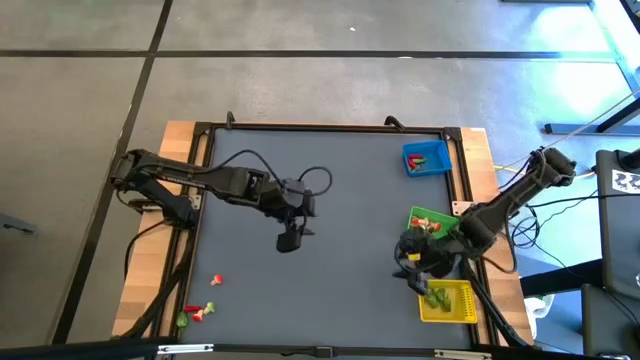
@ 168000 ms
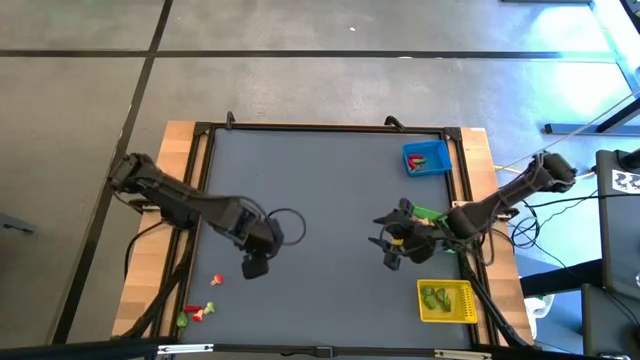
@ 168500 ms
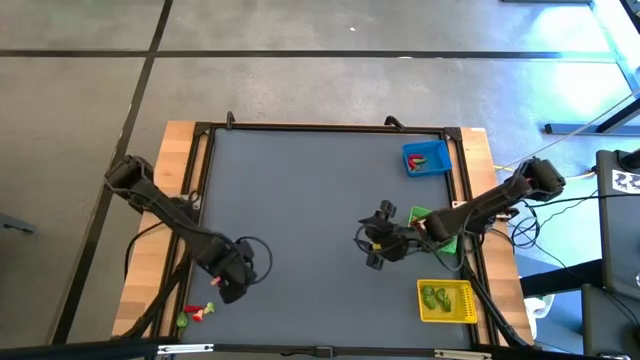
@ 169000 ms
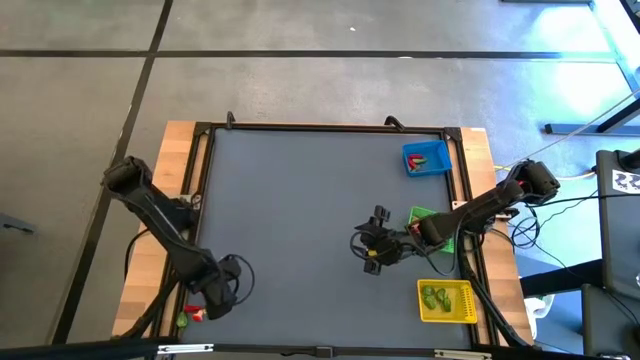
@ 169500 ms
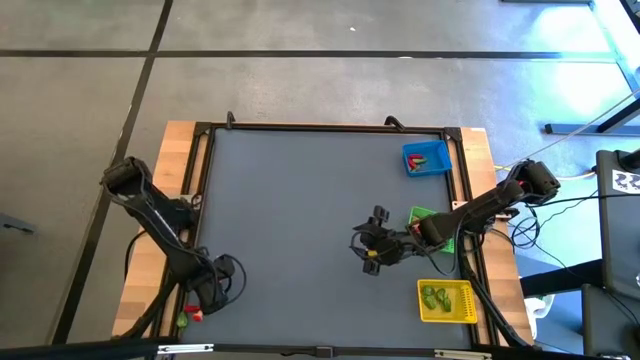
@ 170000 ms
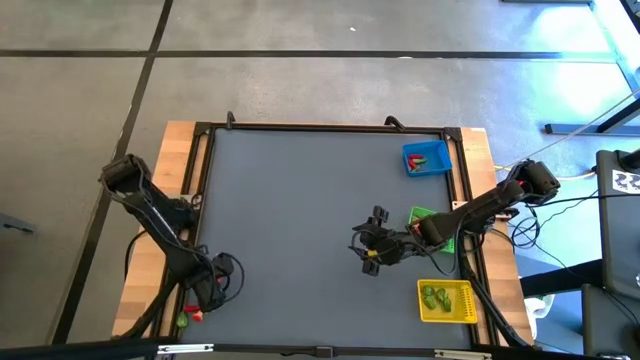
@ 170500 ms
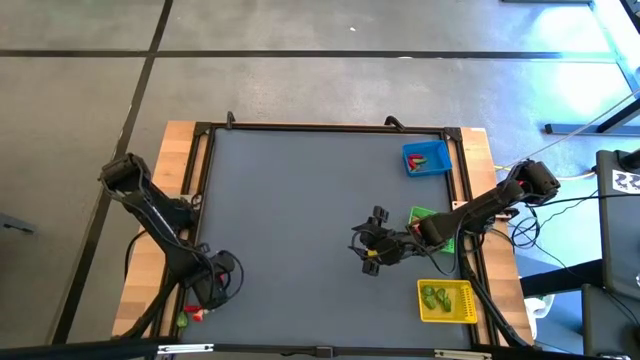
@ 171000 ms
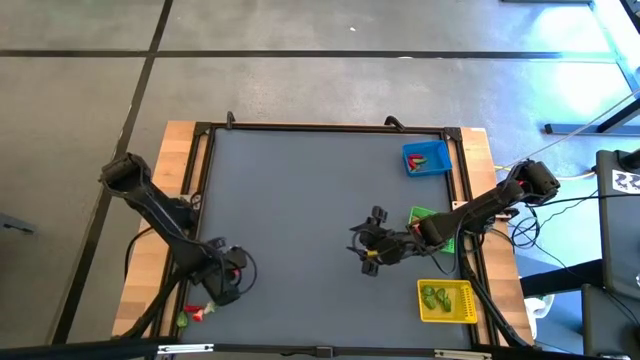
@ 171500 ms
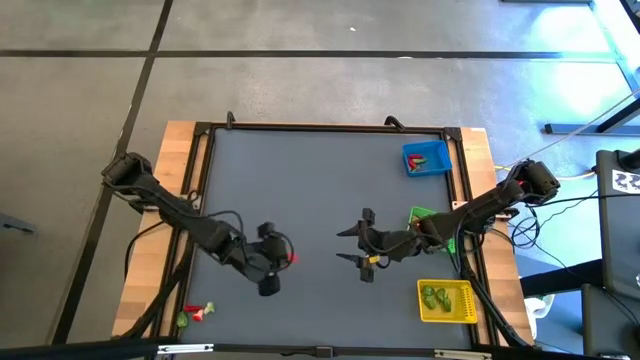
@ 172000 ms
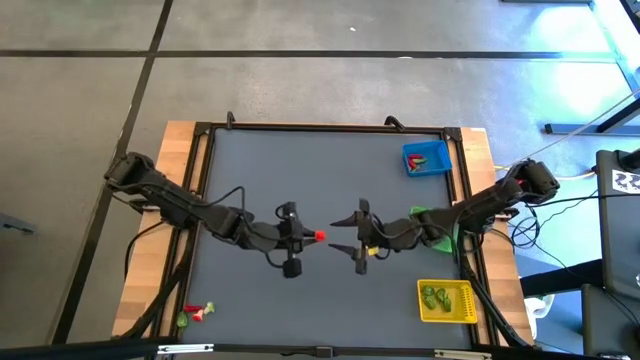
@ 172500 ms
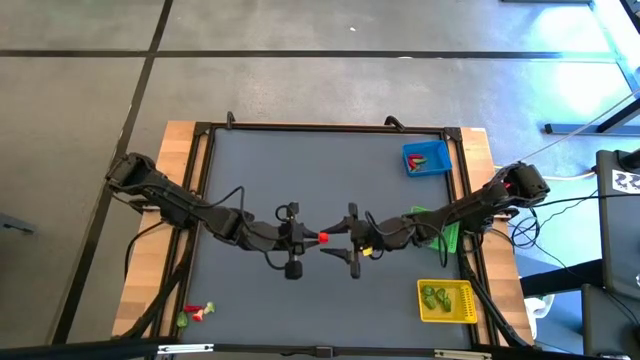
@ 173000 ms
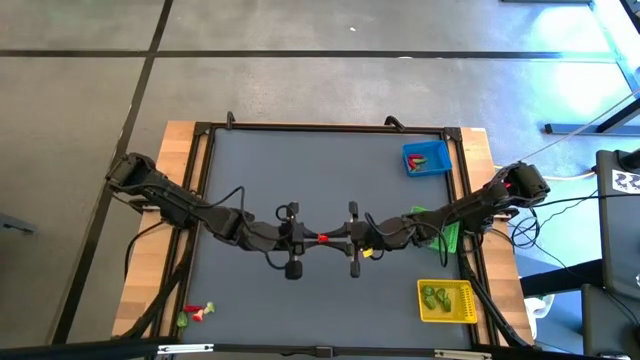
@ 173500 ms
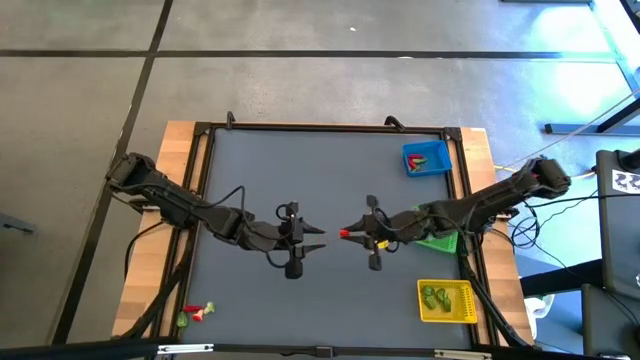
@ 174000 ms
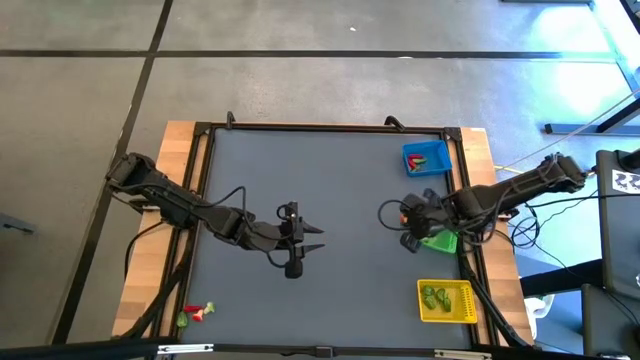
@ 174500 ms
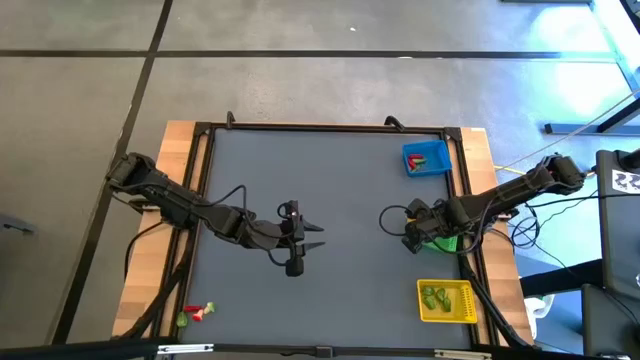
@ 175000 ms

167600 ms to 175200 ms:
Task: Sort produce into baskets
Put the red mushroom into the green basket

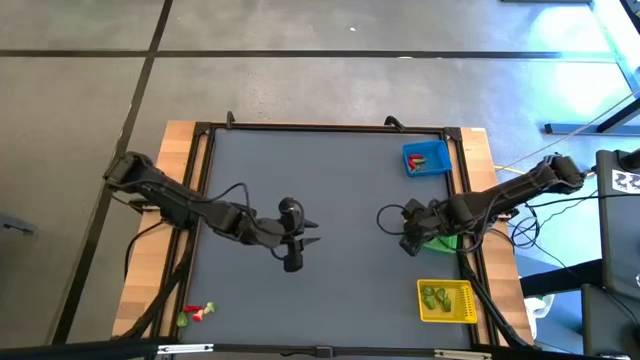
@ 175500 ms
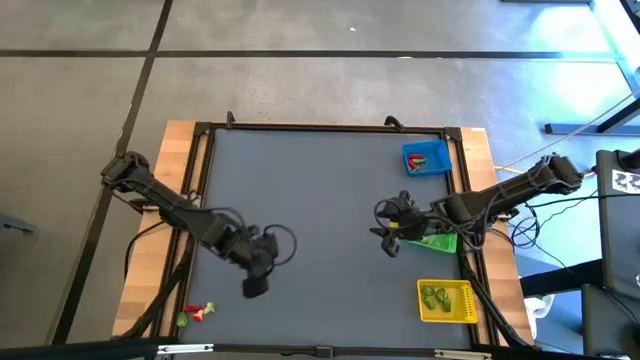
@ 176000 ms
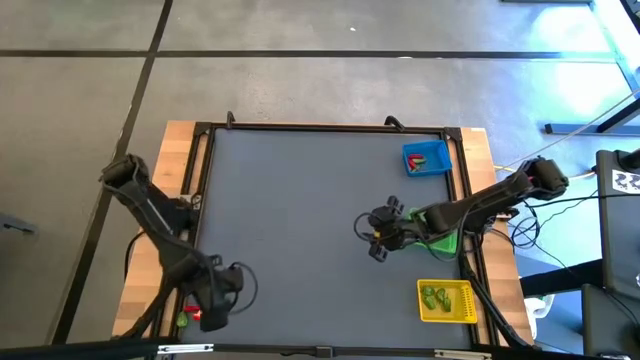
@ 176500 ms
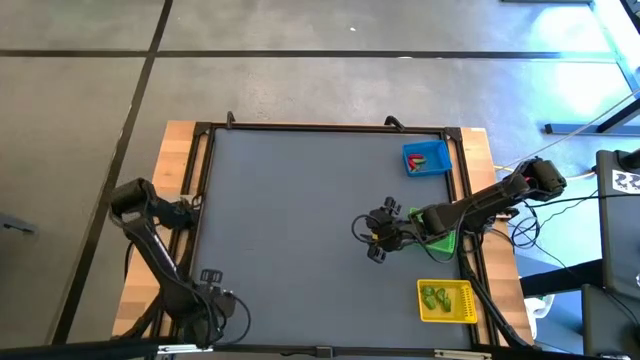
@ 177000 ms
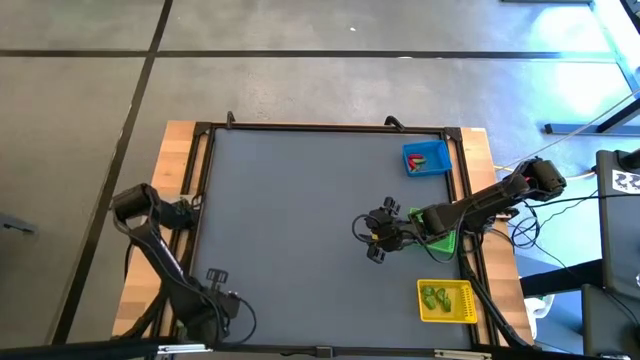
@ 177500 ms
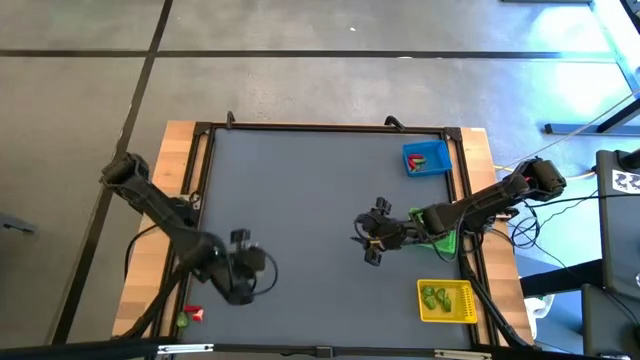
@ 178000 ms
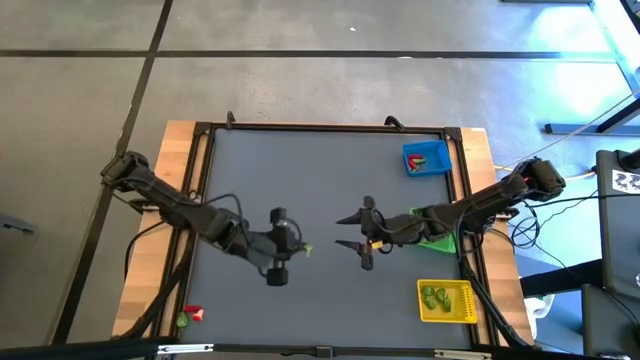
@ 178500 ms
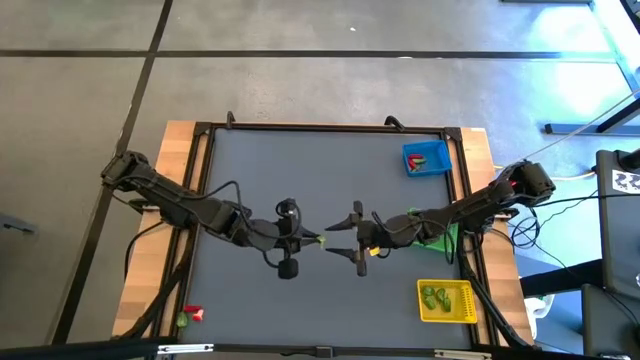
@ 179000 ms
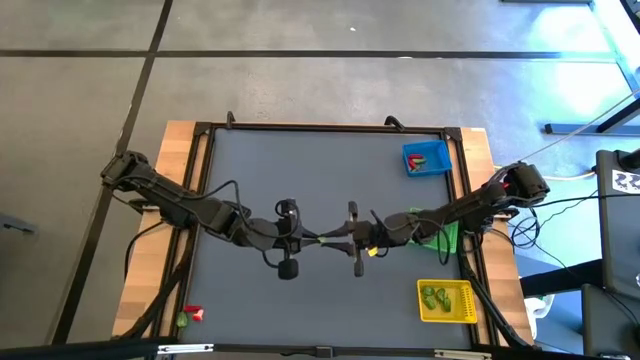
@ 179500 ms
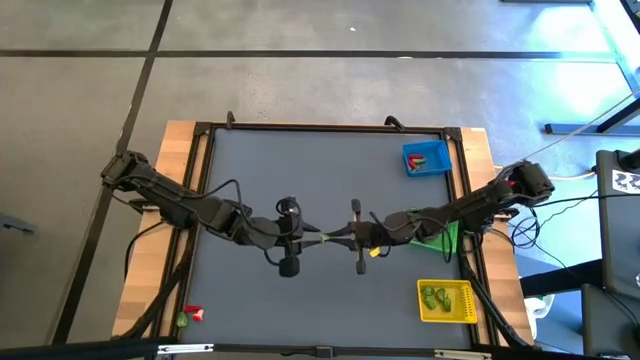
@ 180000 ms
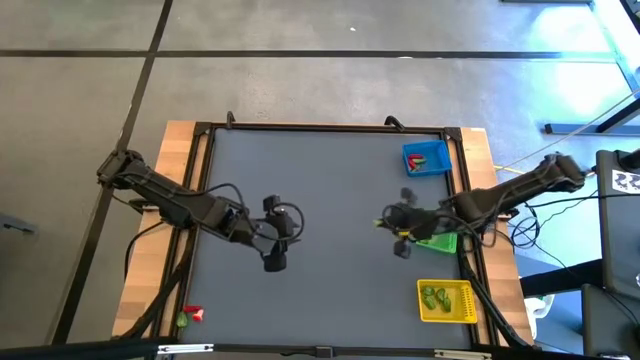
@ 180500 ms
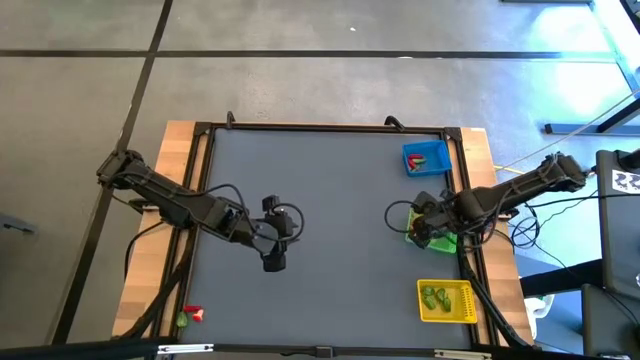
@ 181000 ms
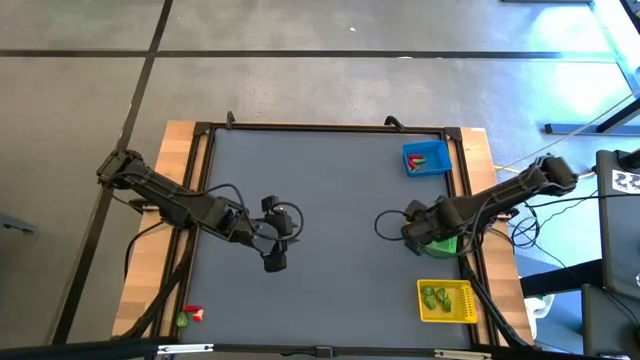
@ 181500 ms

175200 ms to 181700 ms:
Put the green mushroom into the green basket

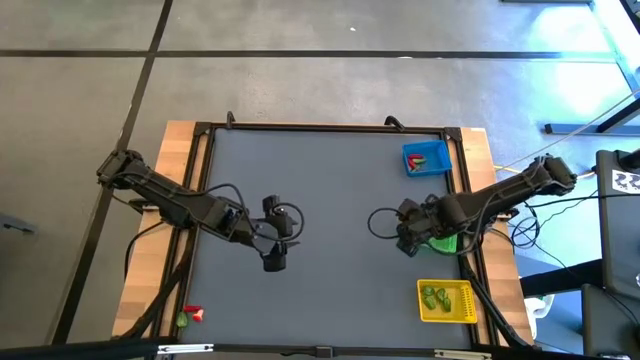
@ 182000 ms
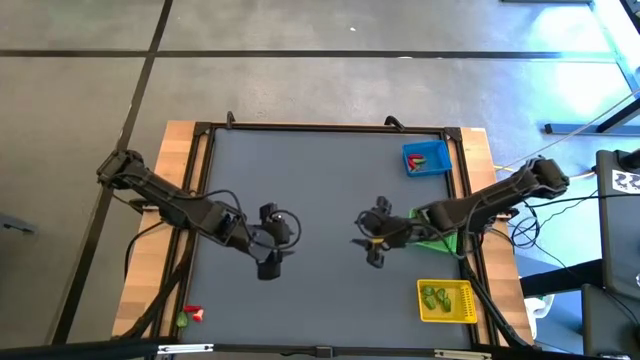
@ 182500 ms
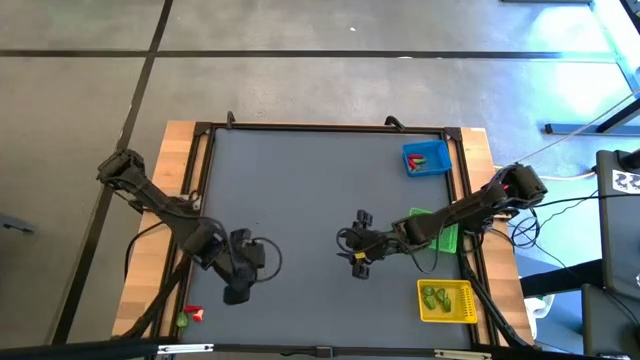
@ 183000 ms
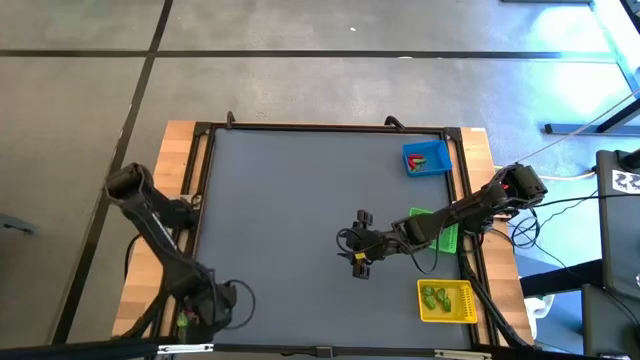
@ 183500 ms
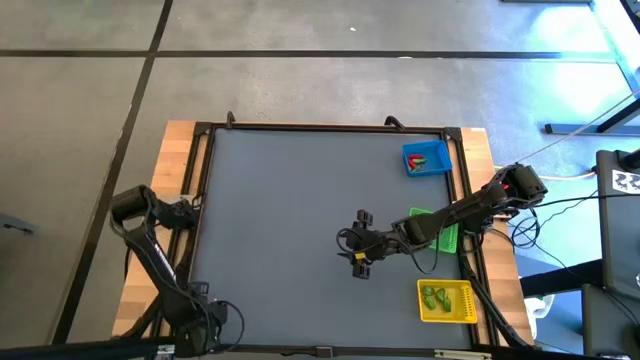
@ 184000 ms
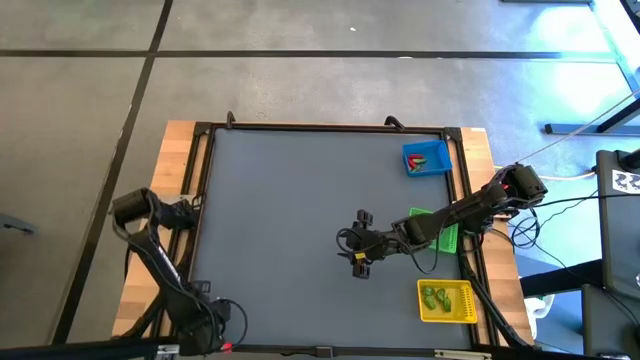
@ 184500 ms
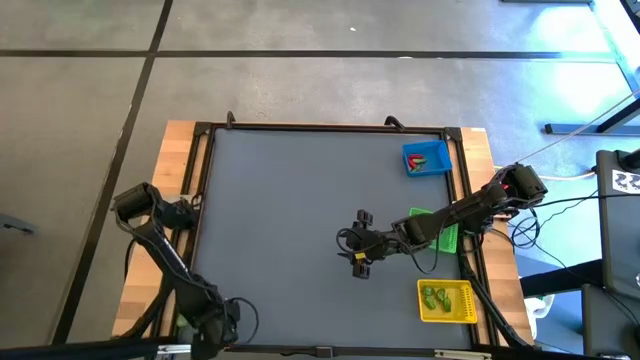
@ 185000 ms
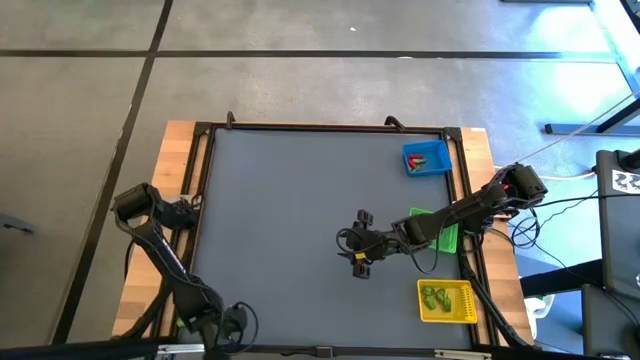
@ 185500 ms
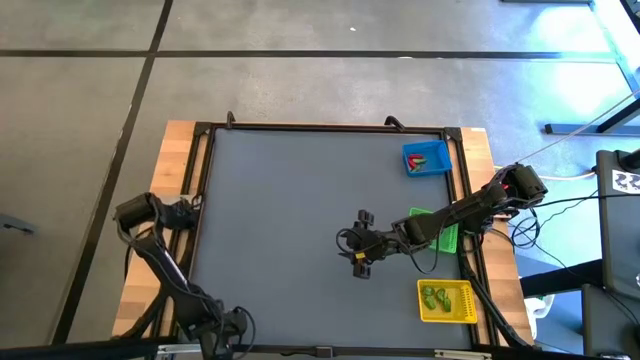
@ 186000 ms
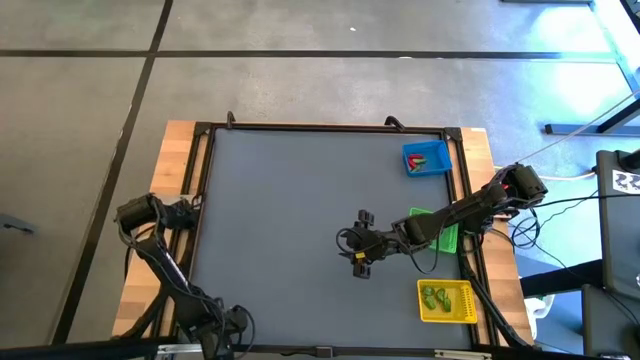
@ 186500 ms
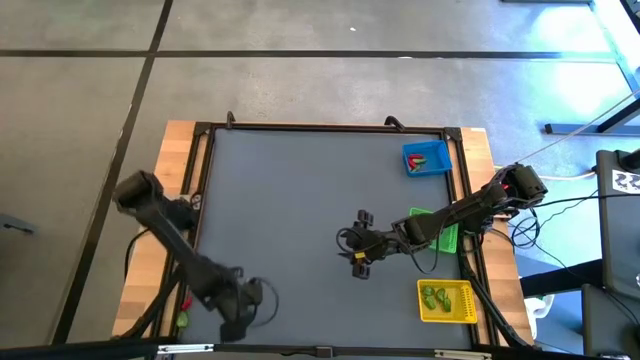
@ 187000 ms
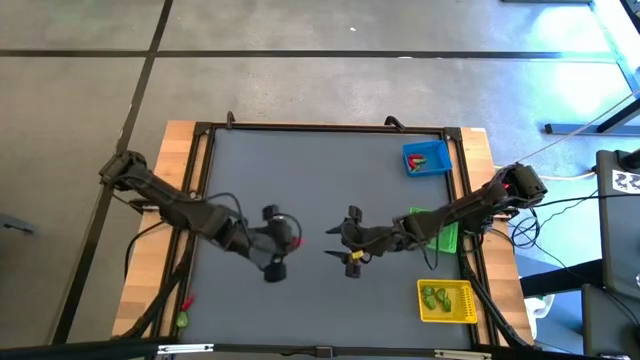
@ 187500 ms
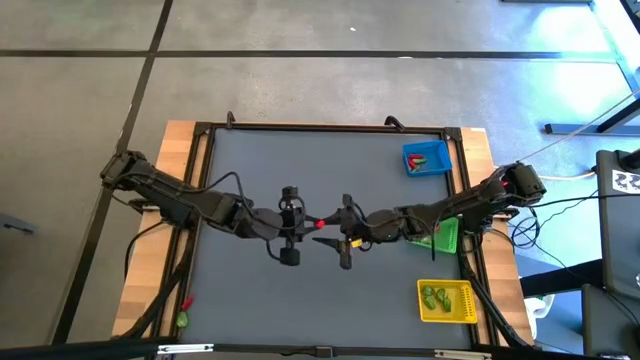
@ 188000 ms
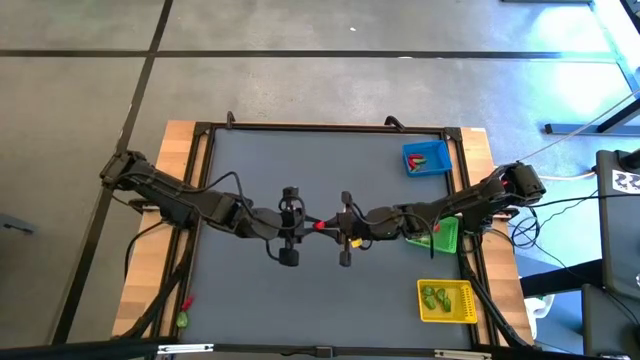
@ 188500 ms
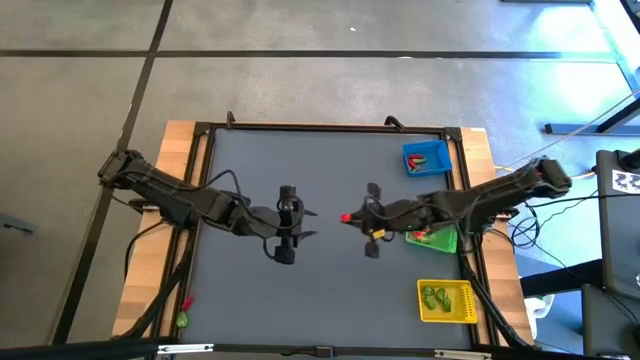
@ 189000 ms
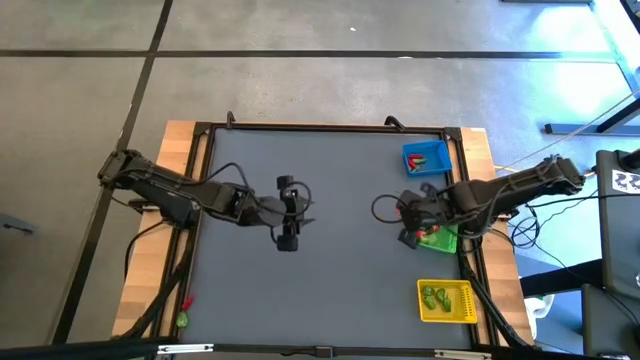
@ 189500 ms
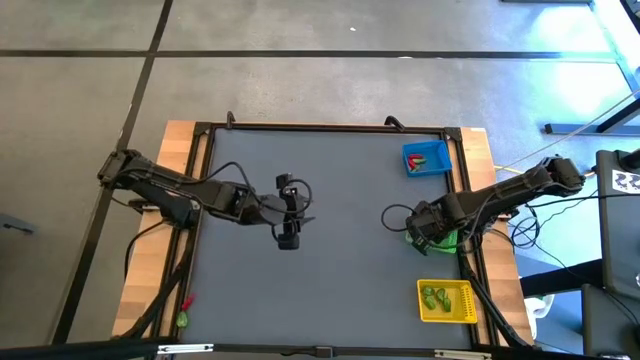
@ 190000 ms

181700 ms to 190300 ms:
Put the red mushroom into the green basket
